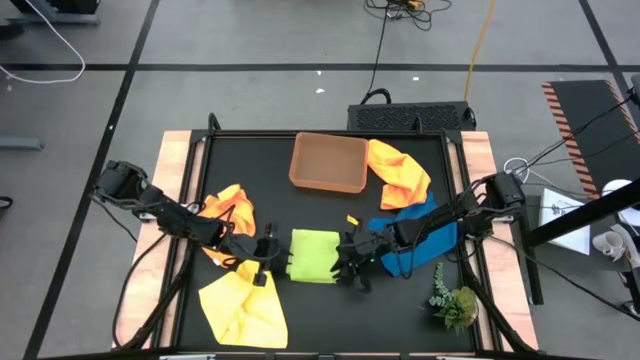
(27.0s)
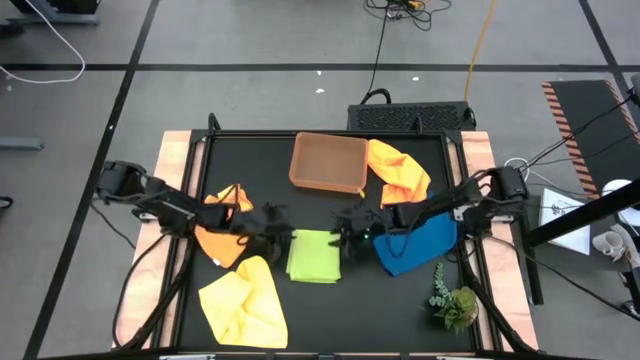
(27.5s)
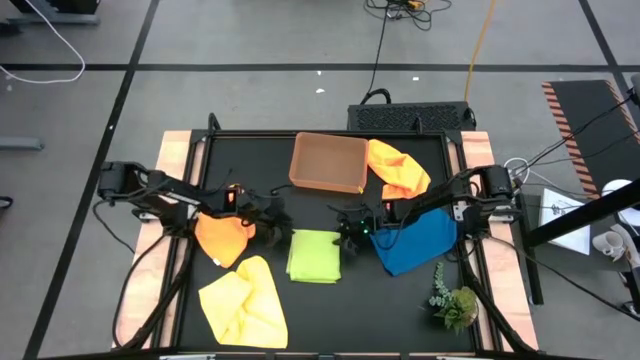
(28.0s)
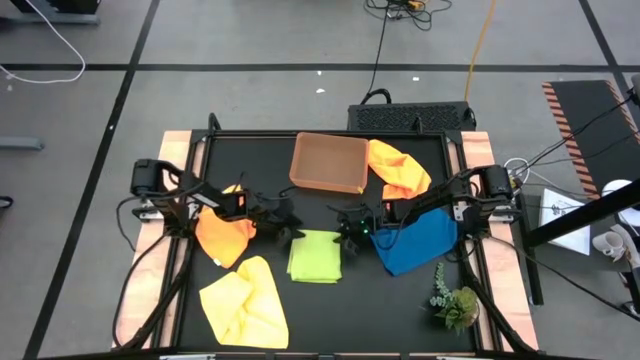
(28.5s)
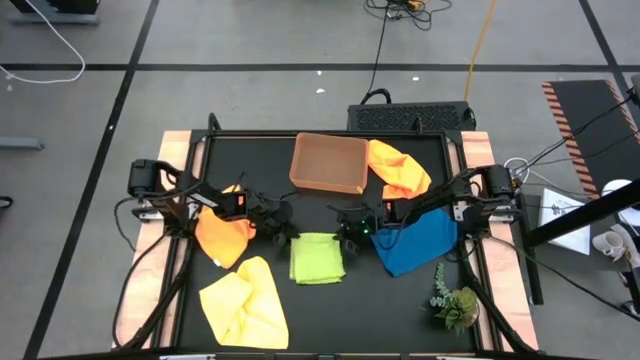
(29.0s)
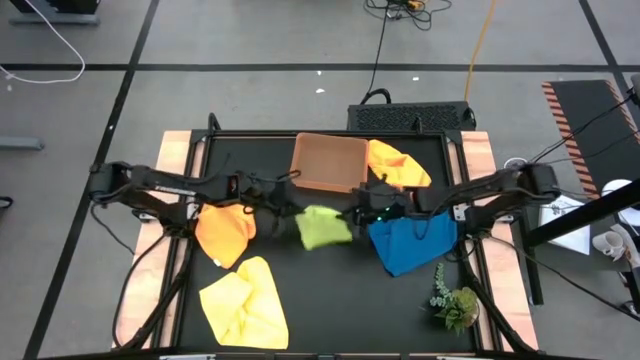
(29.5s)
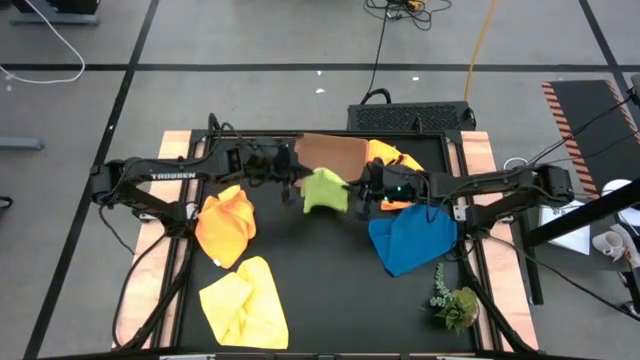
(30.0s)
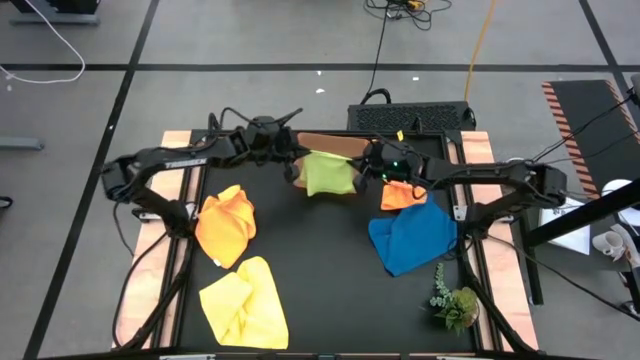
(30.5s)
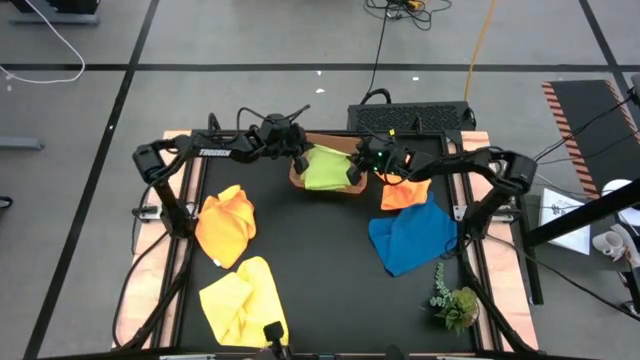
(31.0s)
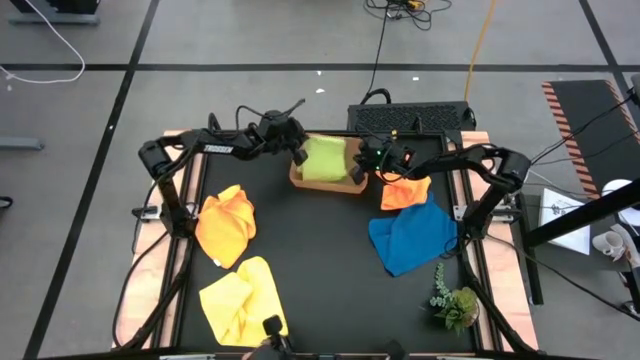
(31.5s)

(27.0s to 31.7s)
Task: Fold microfiber towels
Put the green microfiber cloth into the orange bin

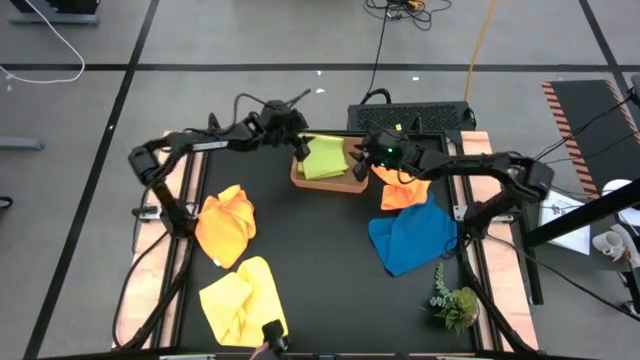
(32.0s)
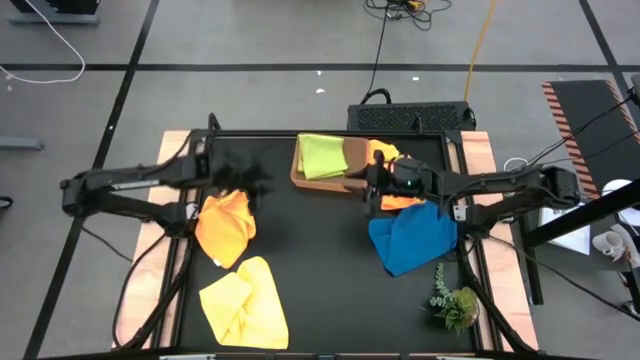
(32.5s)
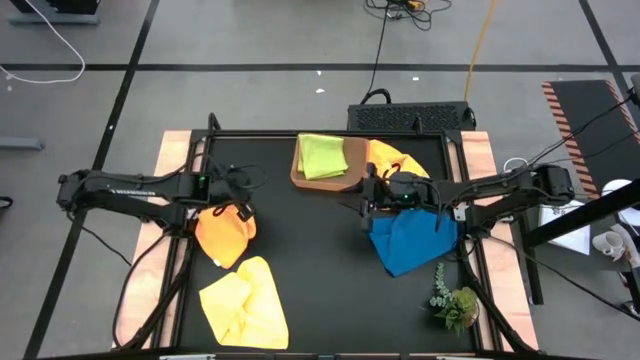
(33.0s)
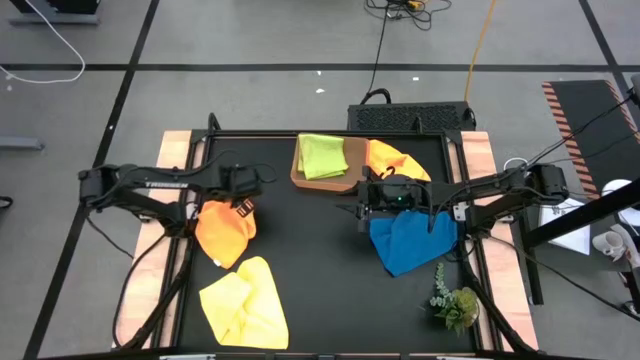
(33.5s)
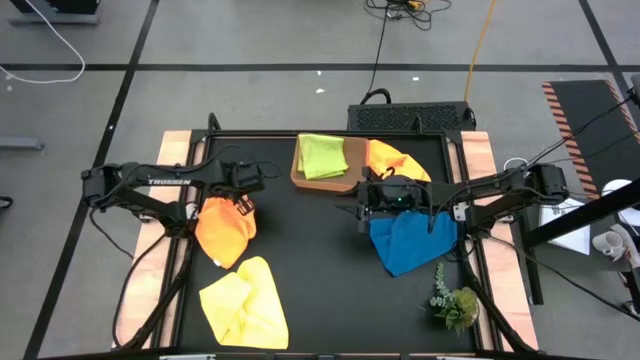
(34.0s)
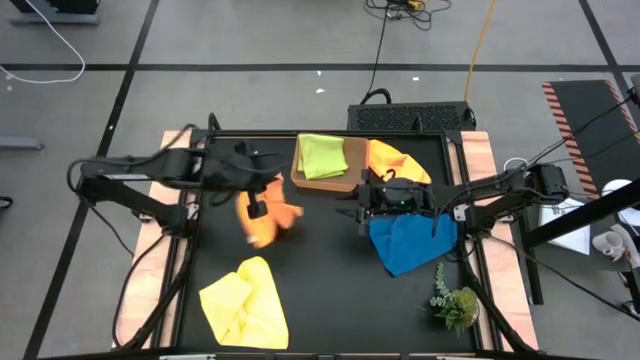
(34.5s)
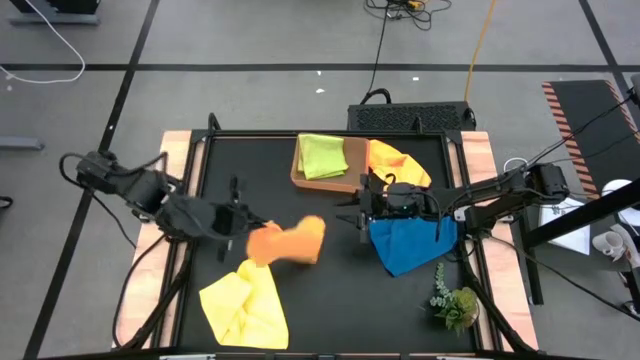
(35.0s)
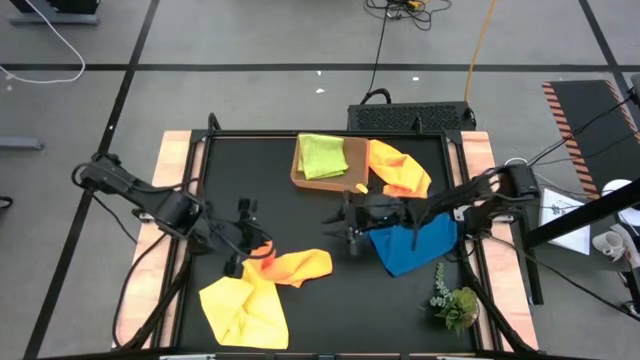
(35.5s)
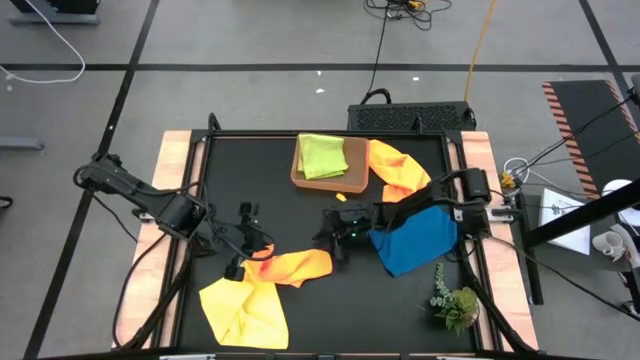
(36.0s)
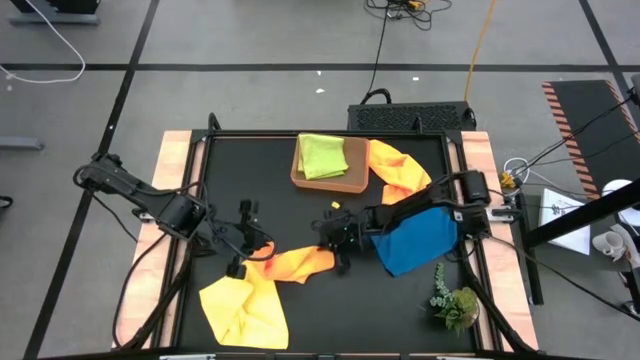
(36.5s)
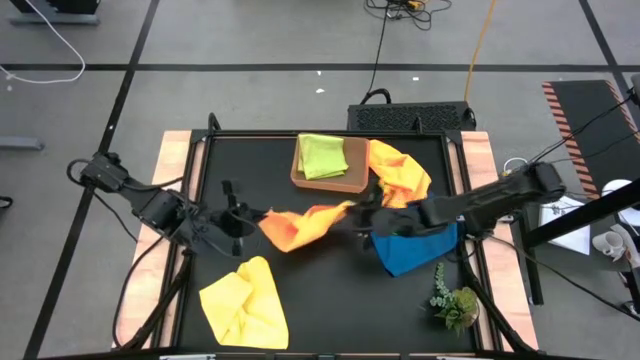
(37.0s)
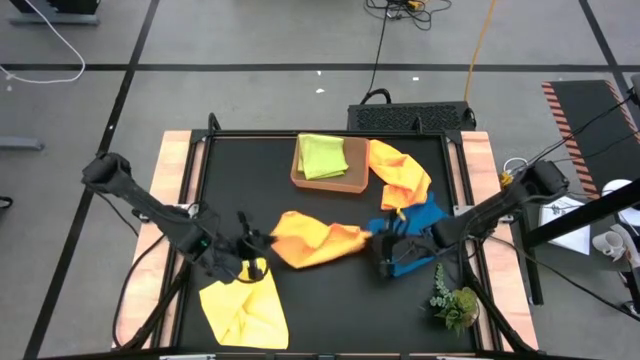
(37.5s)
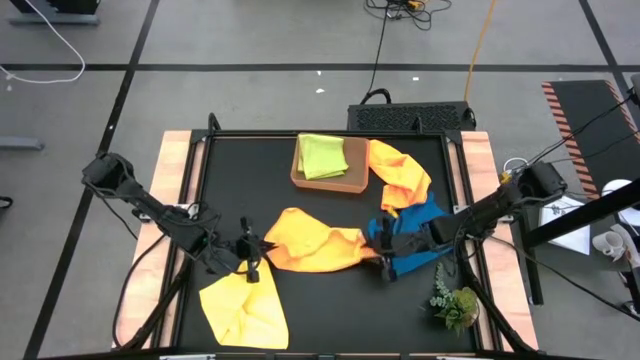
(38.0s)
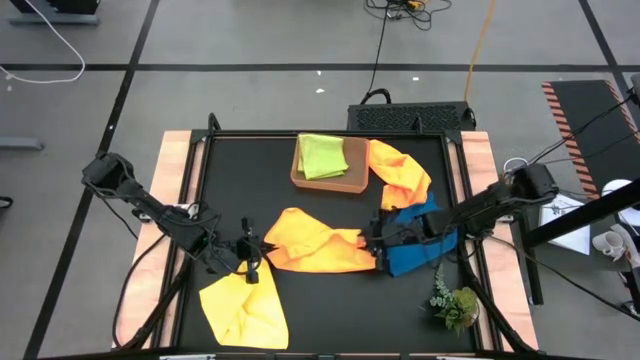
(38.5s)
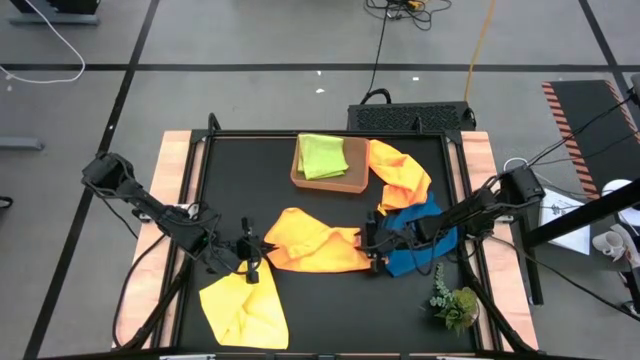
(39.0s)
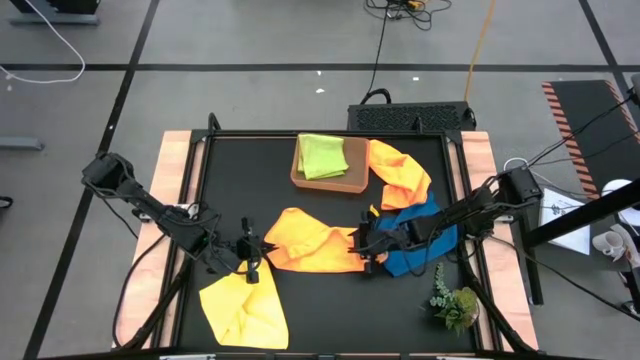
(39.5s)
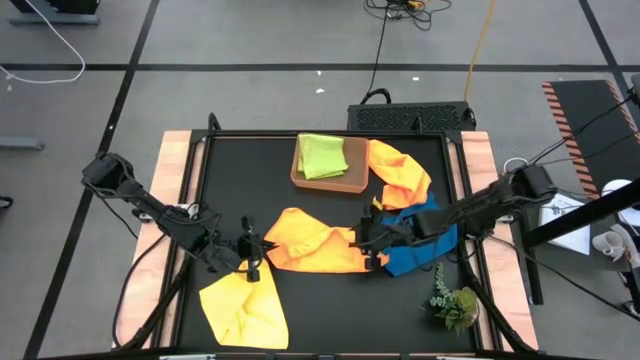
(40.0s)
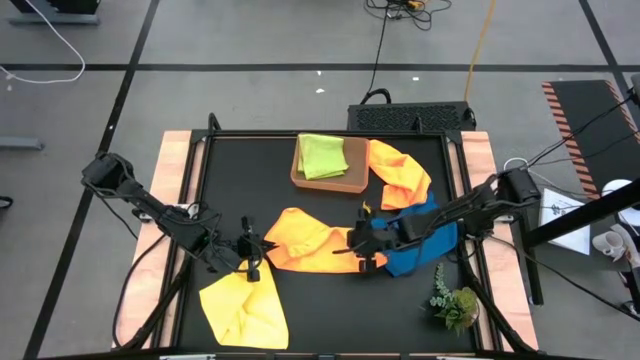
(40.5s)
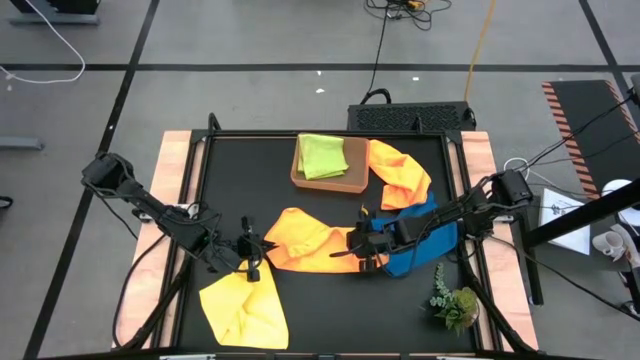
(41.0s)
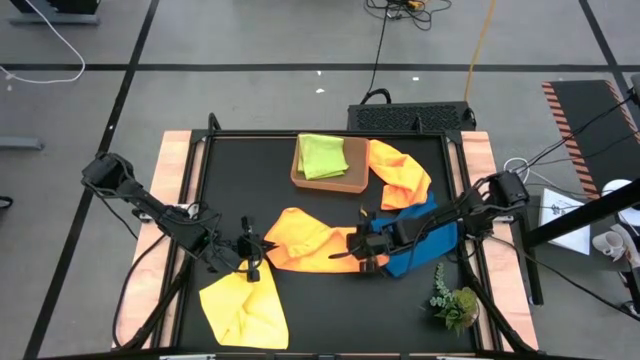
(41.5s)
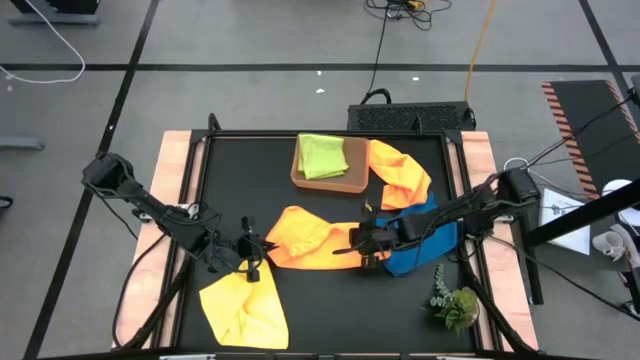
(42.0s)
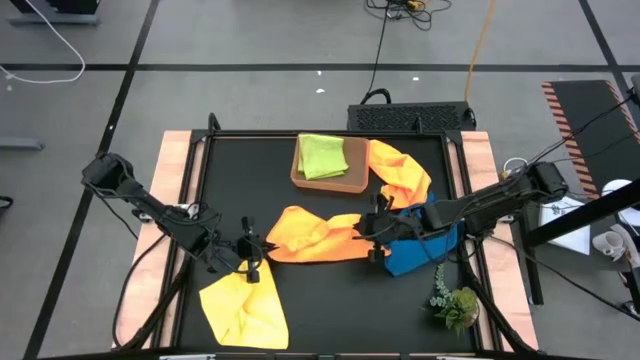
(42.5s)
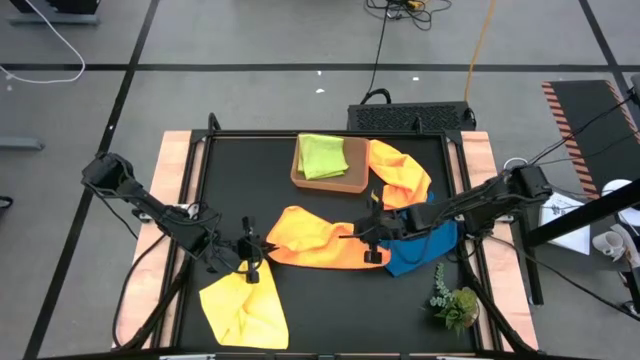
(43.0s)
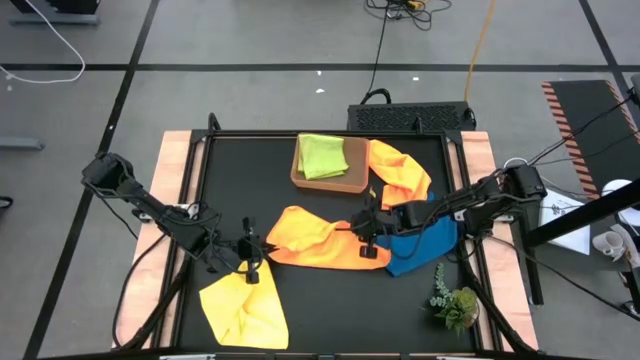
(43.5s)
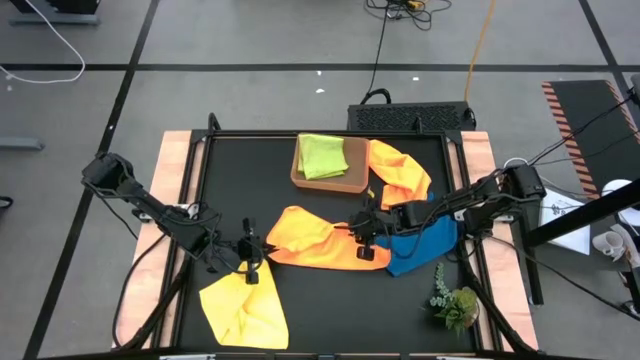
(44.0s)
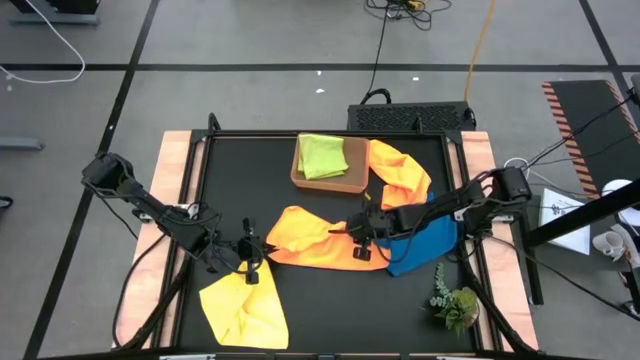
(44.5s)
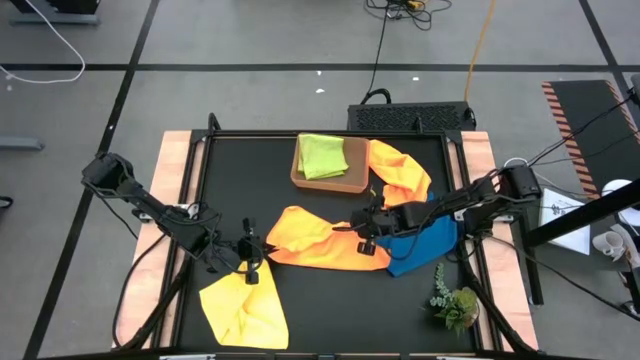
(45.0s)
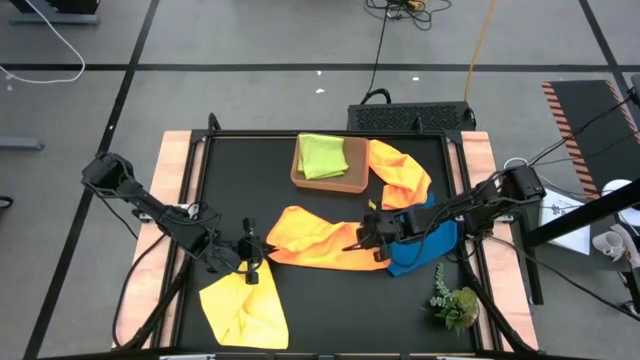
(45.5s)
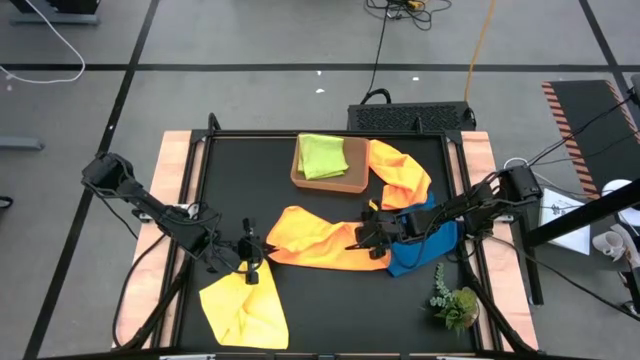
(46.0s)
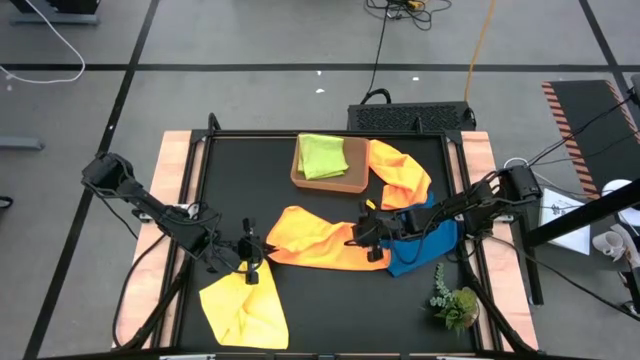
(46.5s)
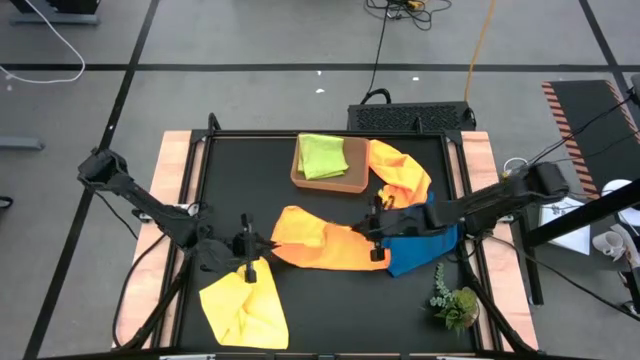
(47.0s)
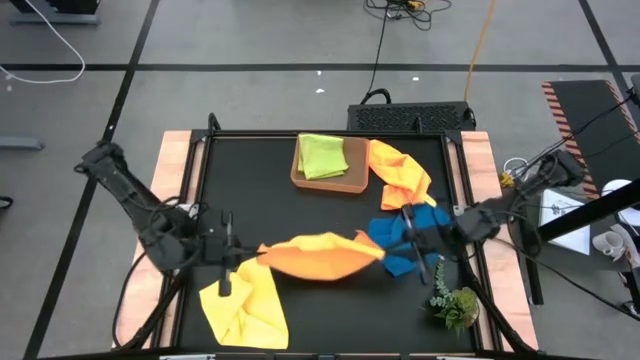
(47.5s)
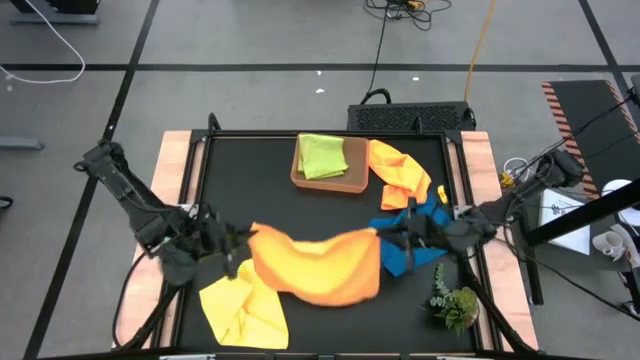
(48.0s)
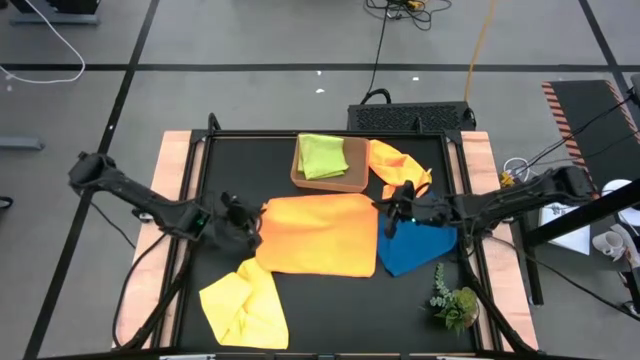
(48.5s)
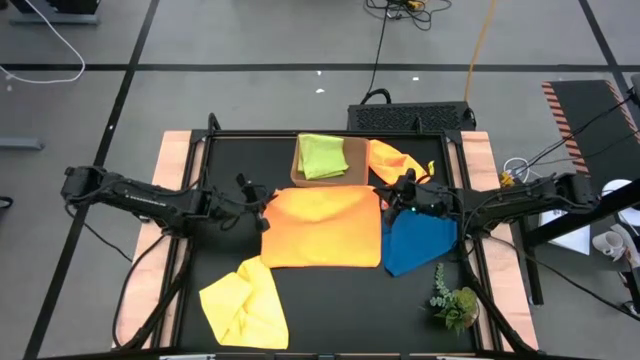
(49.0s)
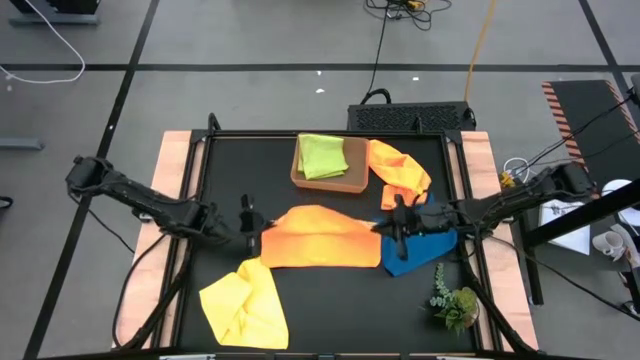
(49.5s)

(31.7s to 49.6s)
Fold the left orange microfiber cloth
